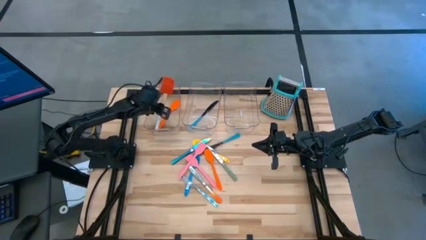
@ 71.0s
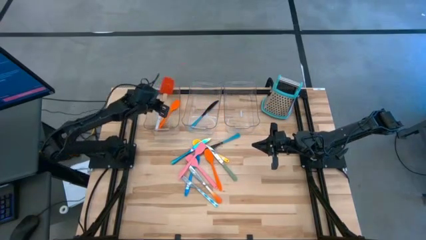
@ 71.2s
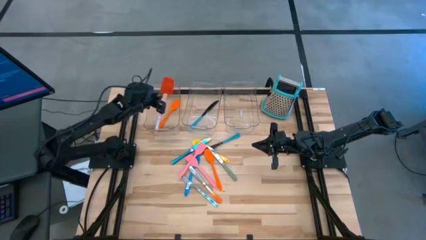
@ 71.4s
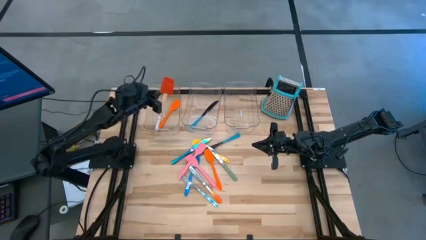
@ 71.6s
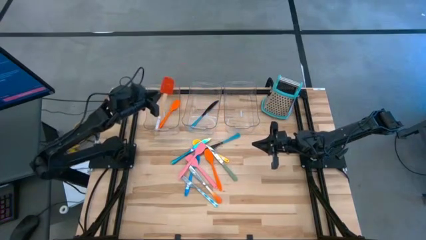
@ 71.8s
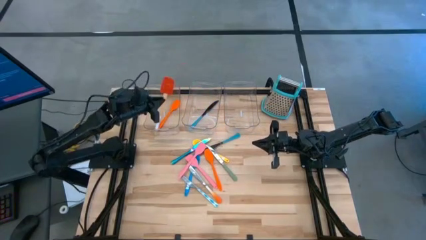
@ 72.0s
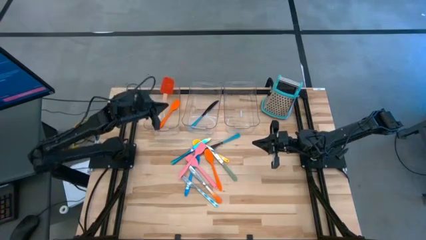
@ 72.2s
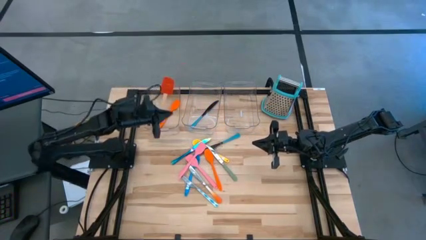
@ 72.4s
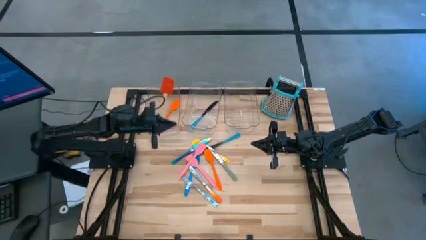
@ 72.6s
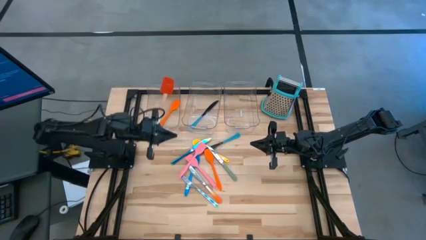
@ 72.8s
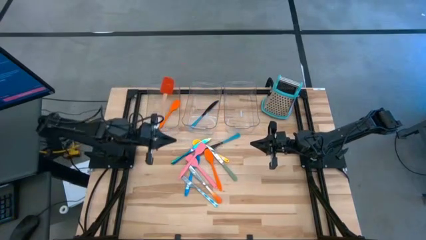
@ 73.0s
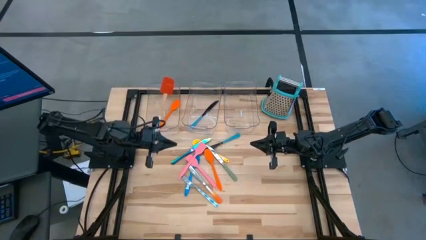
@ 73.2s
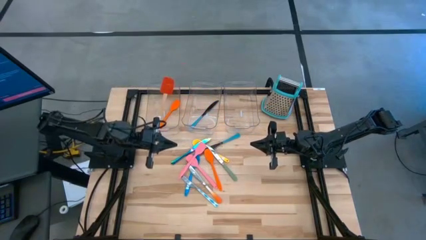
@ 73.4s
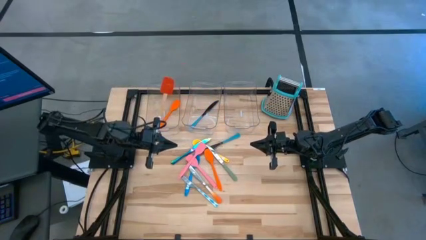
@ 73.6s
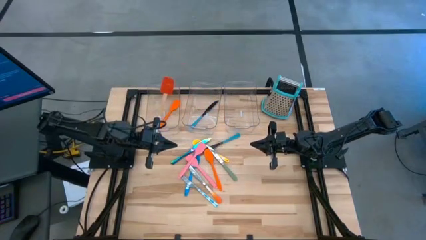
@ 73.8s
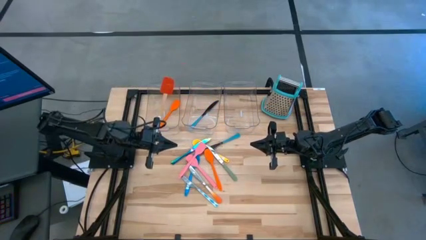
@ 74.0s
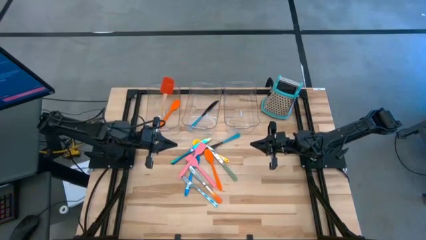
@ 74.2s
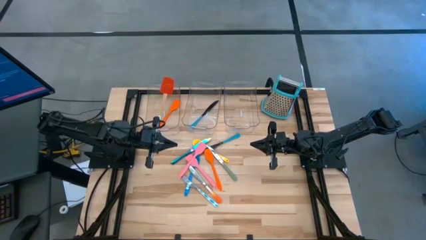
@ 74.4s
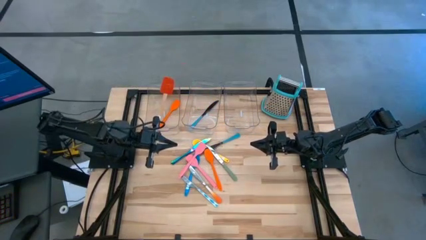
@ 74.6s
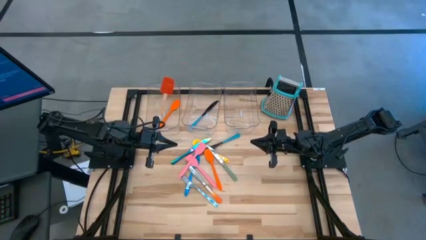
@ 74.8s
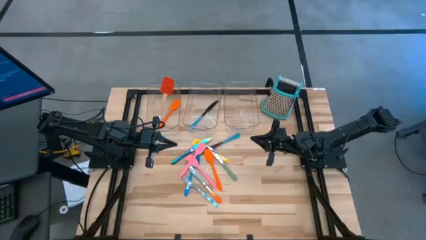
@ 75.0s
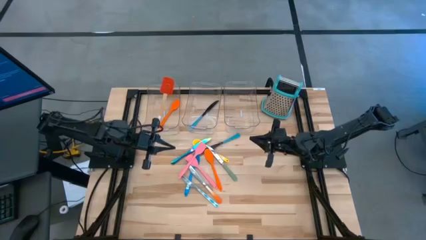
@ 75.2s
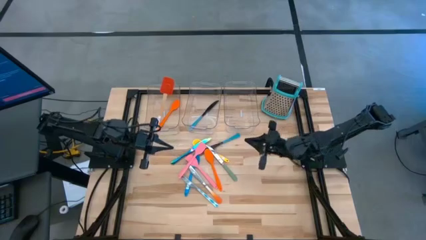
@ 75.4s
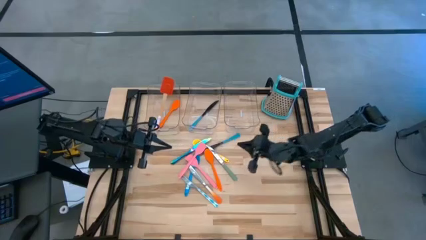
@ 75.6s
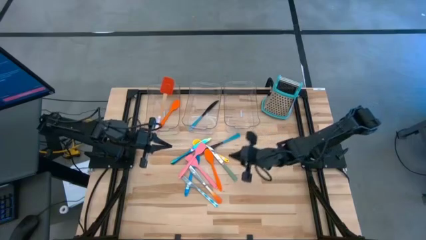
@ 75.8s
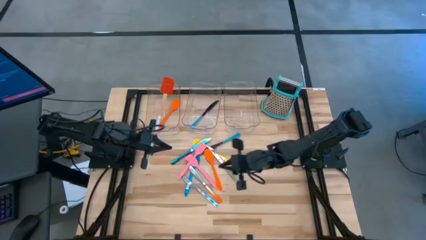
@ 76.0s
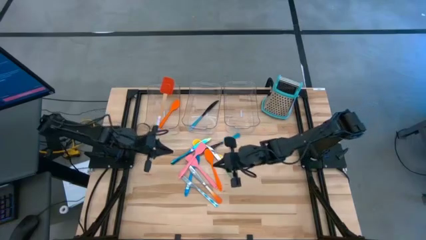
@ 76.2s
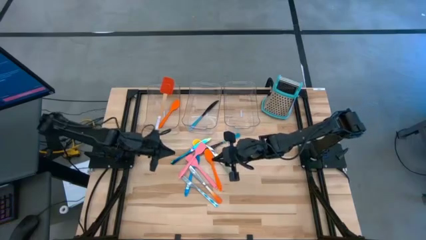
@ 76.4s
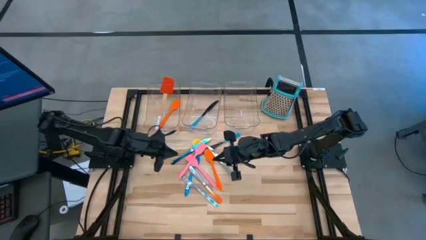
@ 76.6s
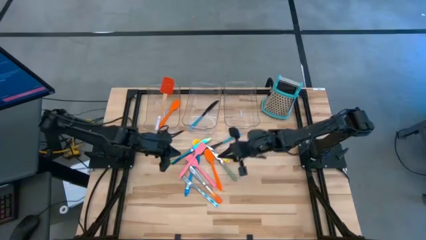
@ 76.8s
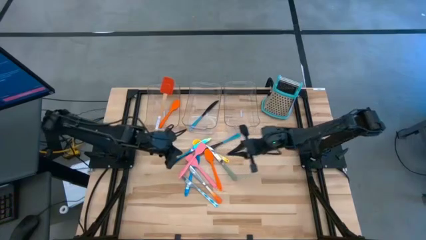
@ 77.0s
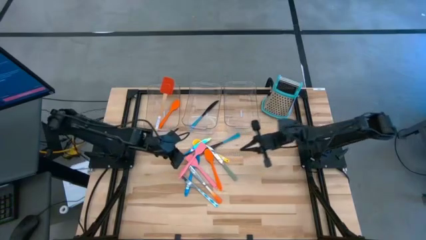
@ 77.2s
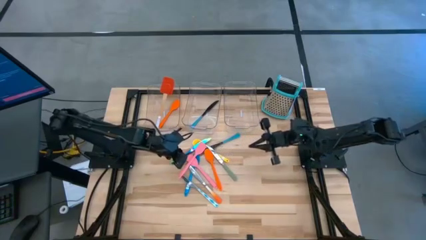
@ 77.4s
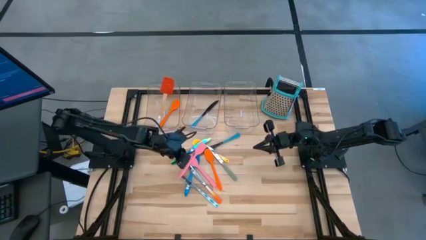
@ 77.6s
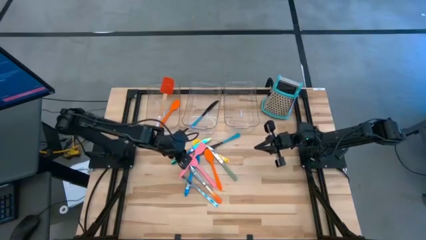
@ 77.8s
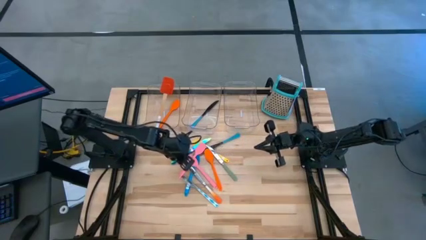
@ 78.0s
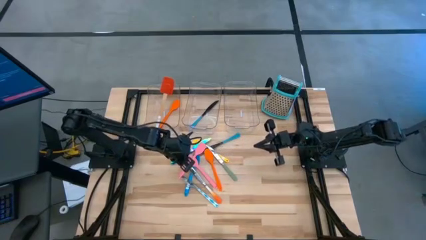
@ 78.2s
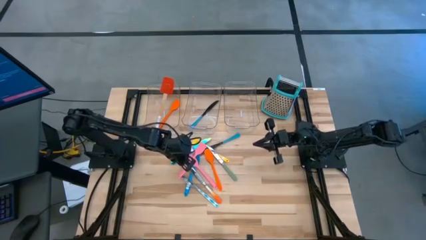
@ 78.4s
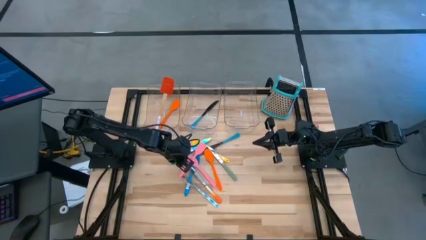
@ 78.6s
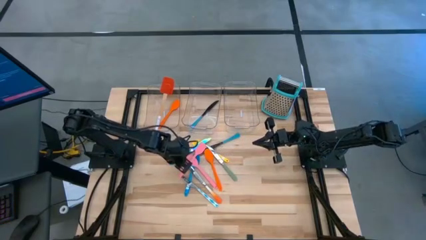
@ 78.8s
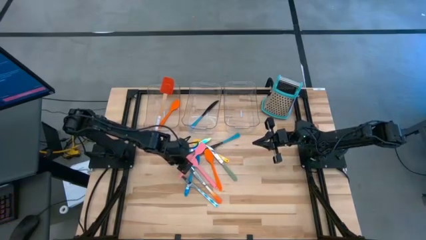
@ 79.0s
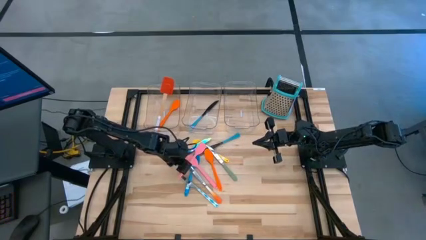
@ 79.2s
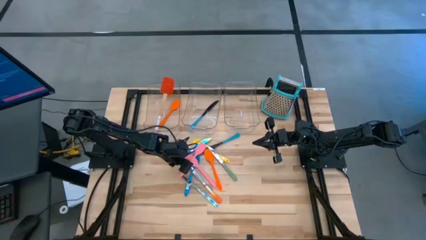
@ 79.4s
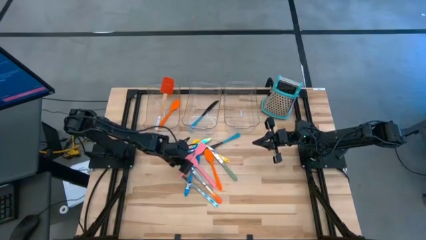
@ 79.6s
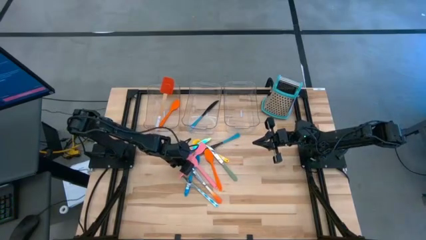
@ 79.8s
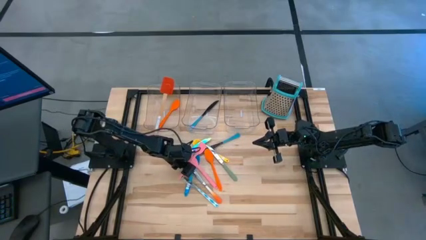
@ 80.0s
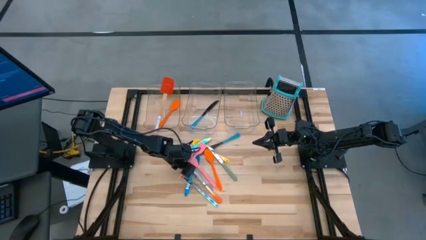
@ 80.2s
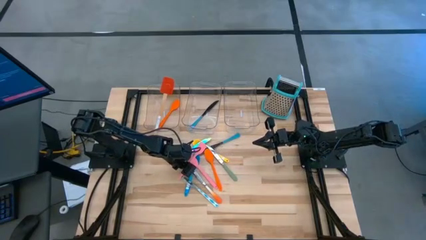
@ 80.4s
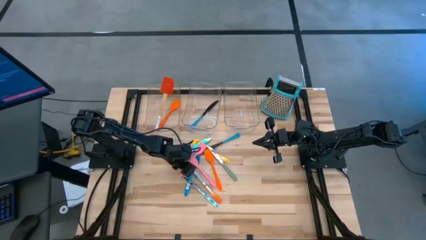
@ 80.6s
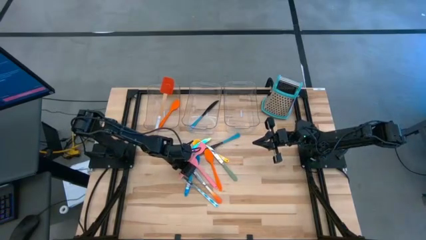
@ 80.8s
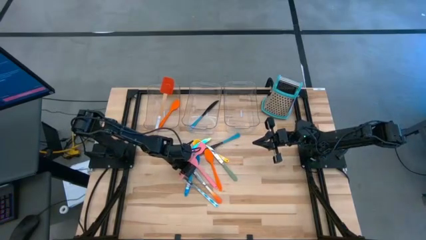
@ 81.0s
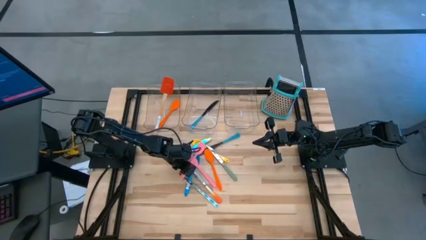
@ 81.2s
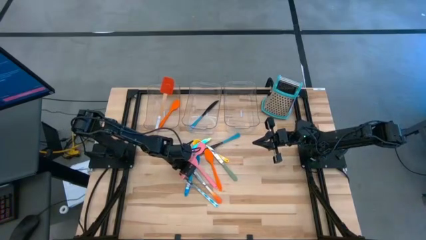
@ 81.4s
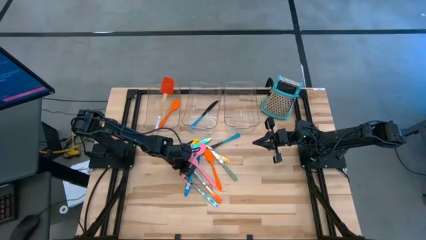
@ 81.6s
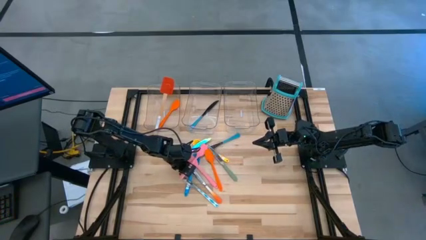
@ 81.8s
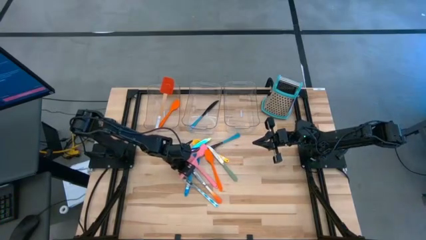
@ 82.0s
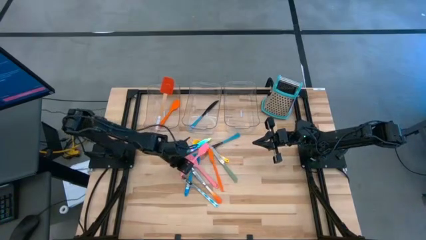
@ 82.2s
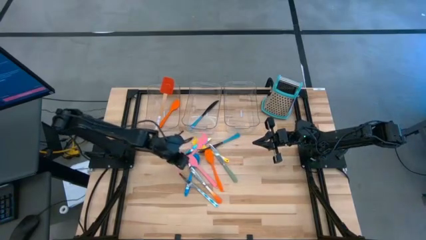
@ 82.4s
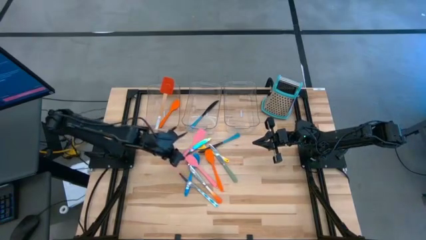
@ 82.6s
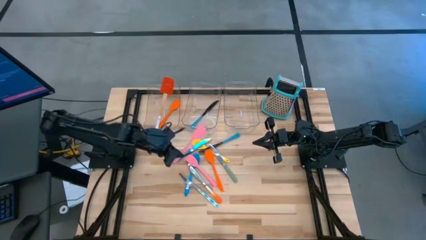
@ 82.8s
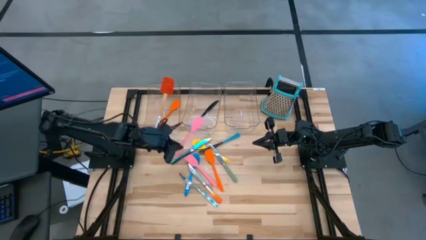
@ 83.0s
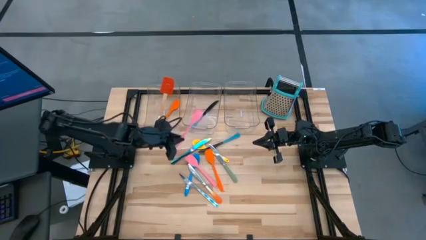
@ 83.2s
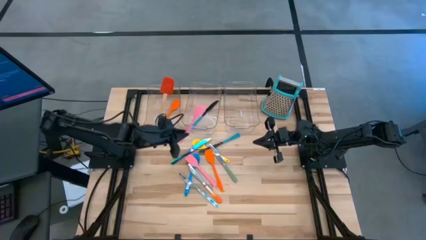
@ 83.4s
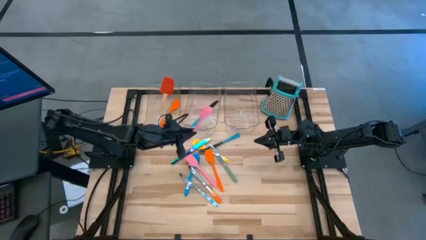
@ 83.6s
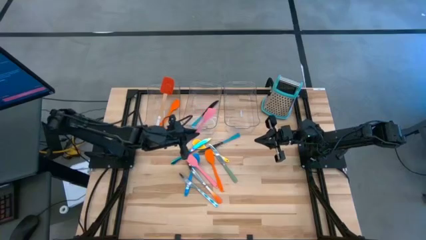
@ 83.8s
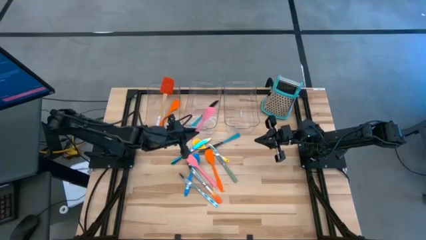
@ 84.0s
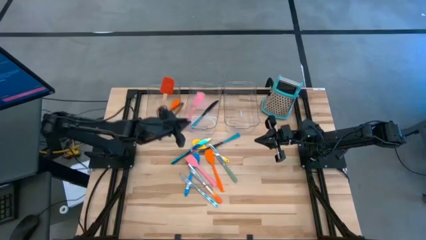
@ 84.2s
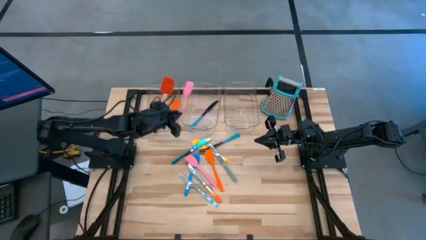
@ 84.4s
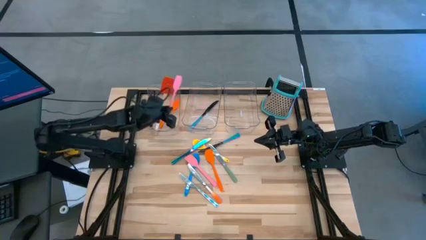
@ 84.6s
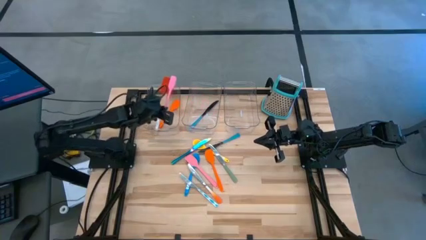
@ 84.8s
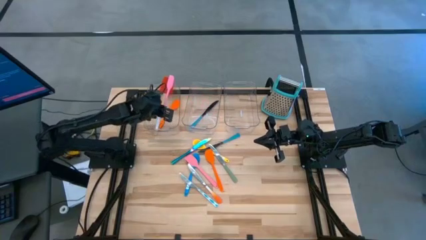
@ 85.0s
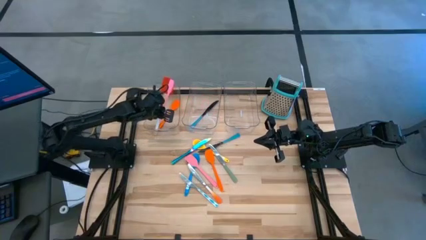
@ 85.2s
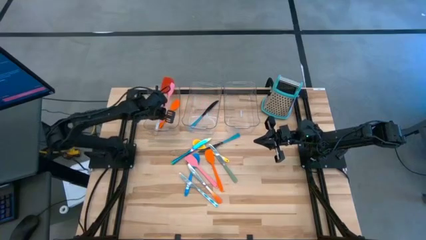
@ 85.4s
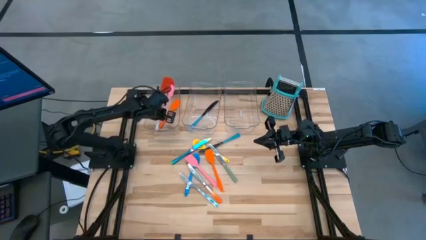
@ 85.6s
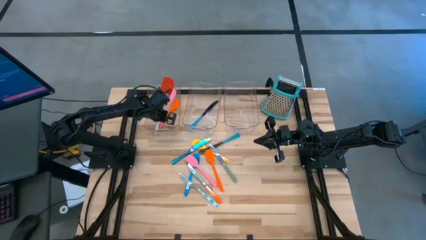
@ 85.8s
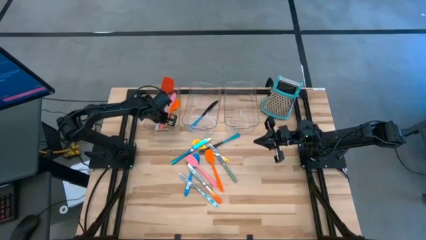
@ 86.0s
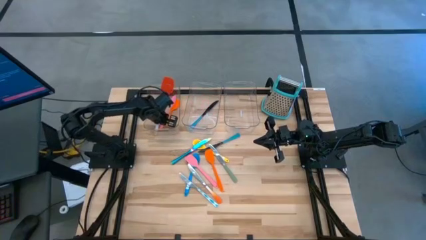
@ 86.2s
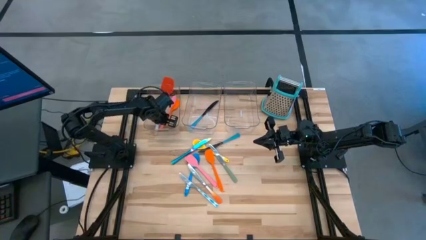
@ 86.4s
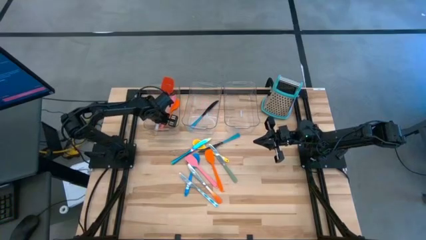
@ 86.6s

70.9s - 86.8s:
Task: Pick & Place Kitchen Items
Put the top pink spatula into the left transparent bin
